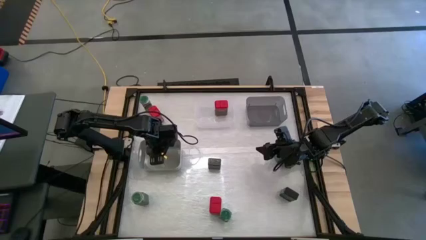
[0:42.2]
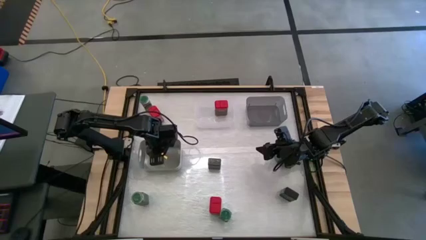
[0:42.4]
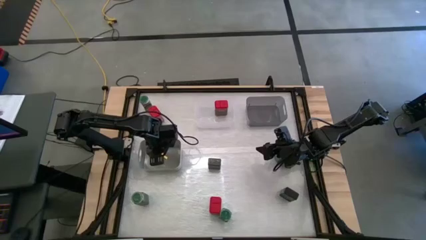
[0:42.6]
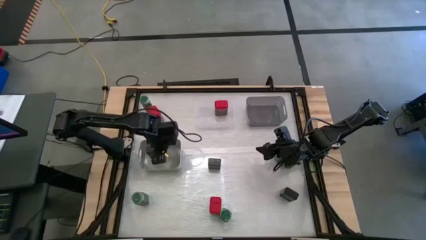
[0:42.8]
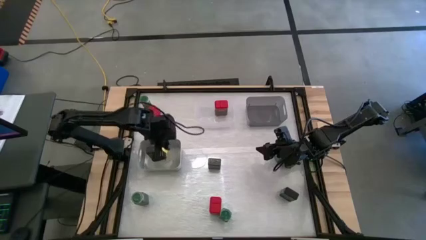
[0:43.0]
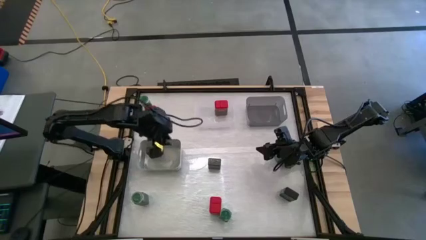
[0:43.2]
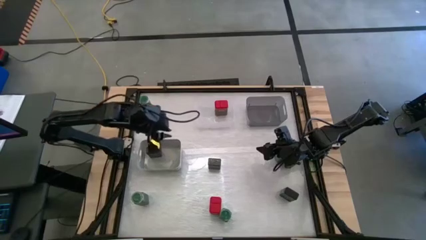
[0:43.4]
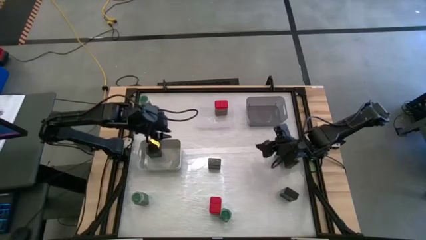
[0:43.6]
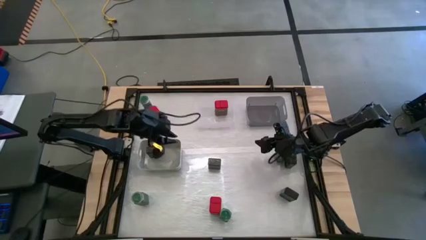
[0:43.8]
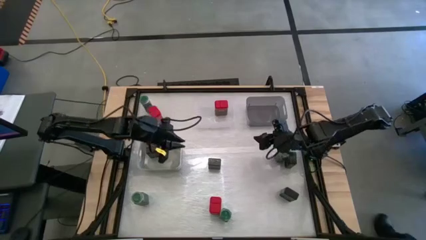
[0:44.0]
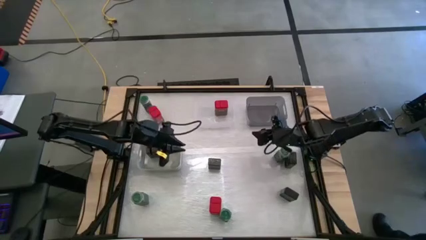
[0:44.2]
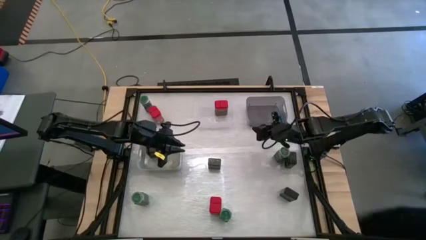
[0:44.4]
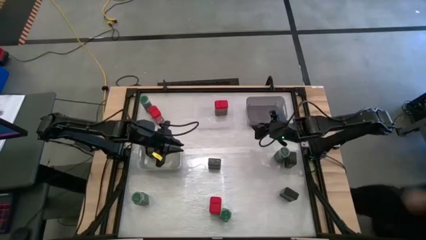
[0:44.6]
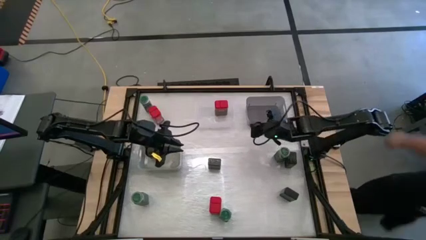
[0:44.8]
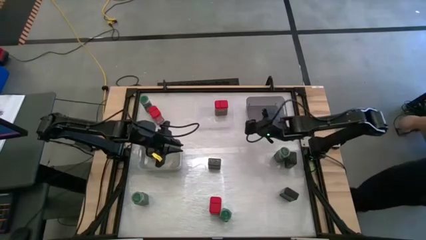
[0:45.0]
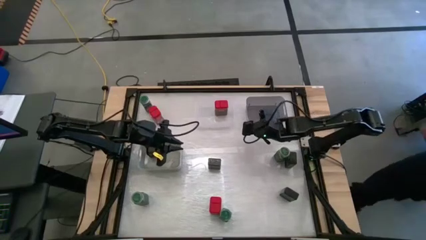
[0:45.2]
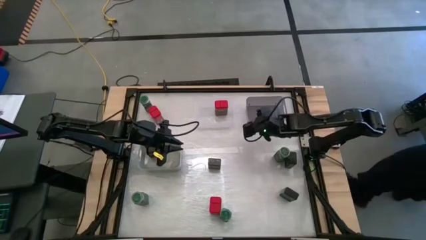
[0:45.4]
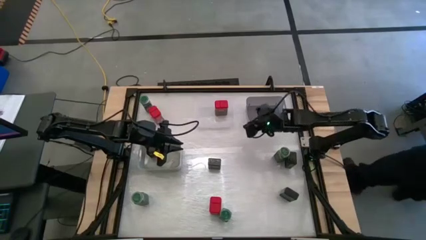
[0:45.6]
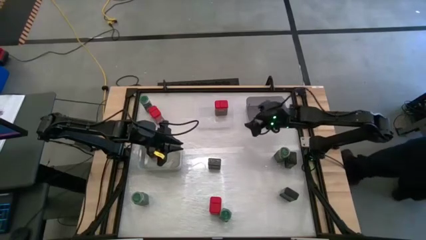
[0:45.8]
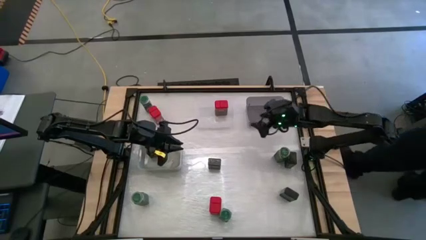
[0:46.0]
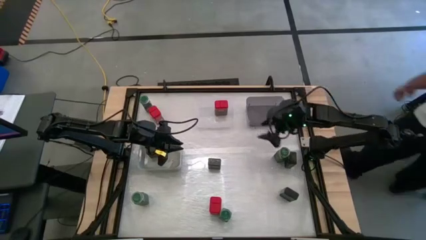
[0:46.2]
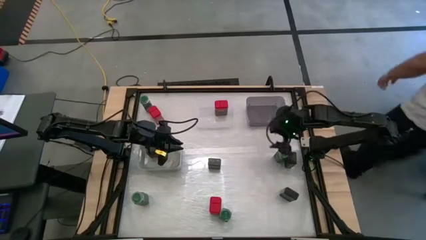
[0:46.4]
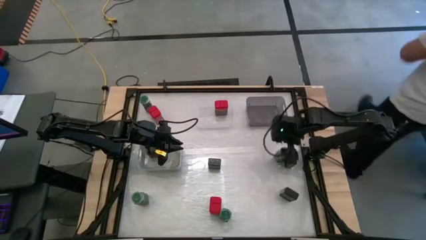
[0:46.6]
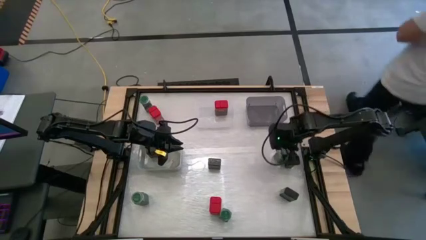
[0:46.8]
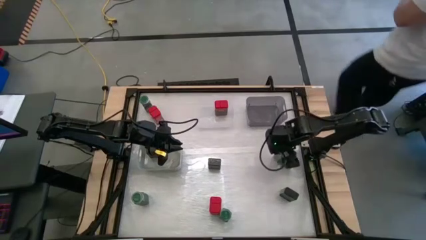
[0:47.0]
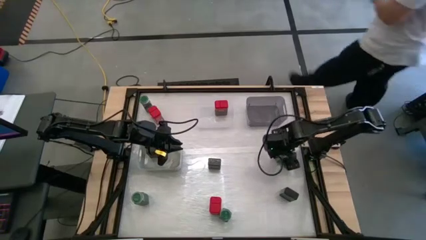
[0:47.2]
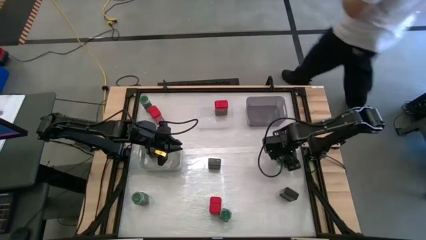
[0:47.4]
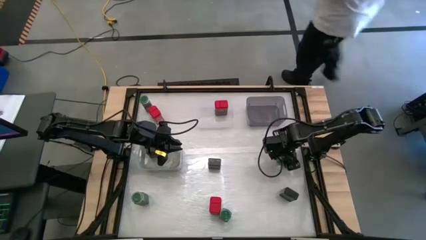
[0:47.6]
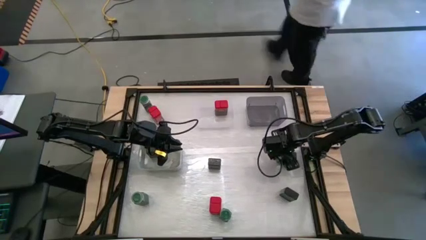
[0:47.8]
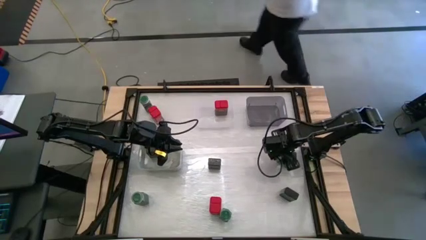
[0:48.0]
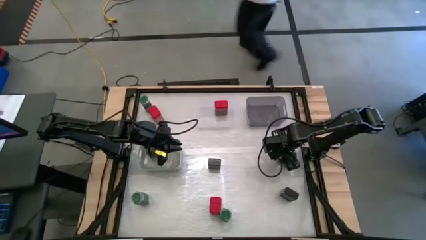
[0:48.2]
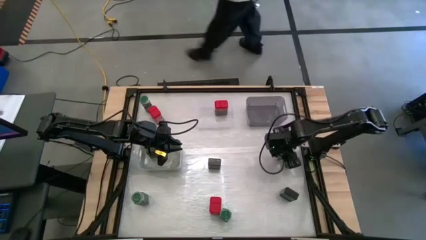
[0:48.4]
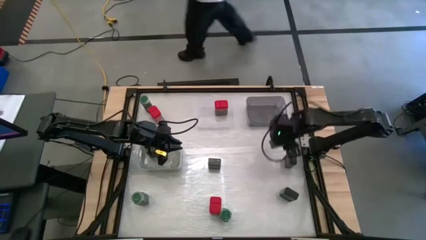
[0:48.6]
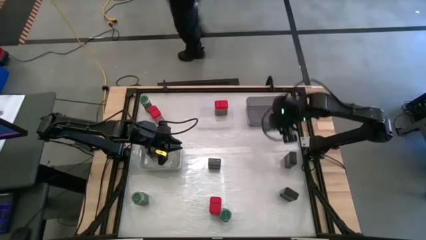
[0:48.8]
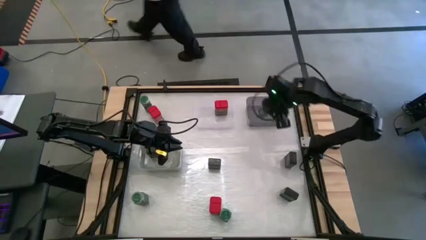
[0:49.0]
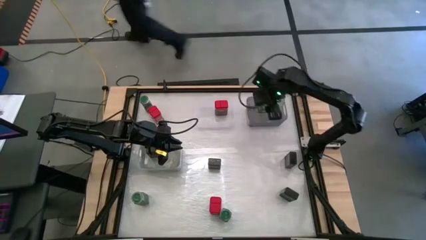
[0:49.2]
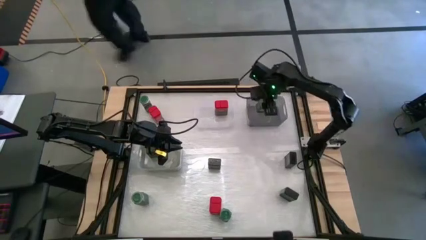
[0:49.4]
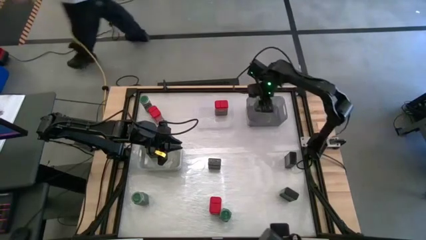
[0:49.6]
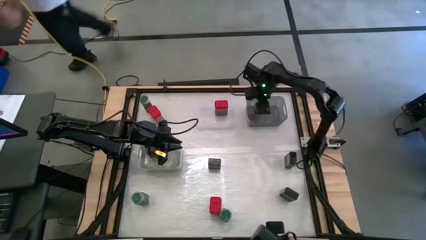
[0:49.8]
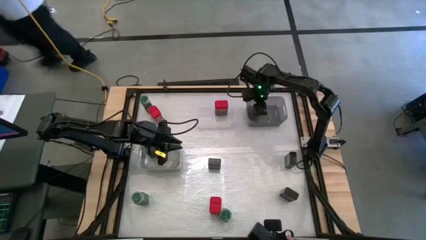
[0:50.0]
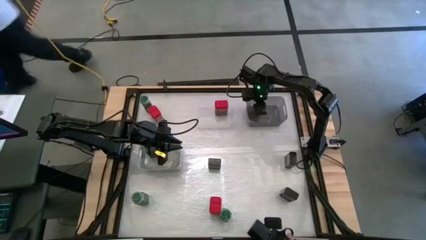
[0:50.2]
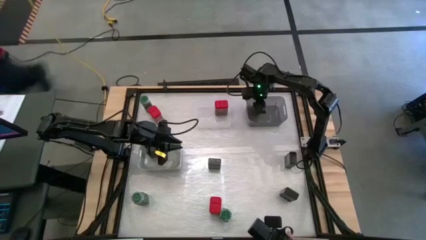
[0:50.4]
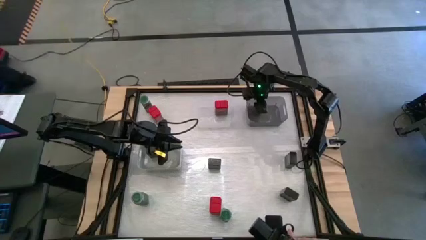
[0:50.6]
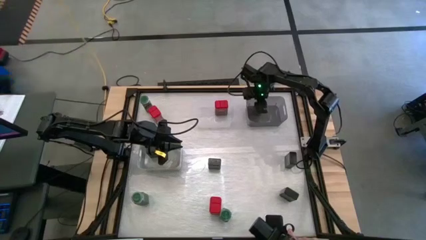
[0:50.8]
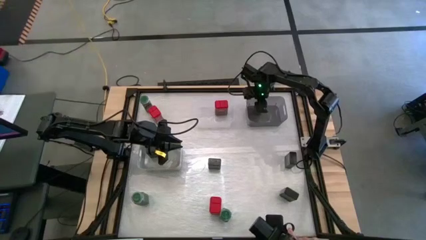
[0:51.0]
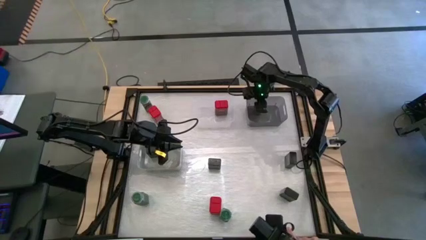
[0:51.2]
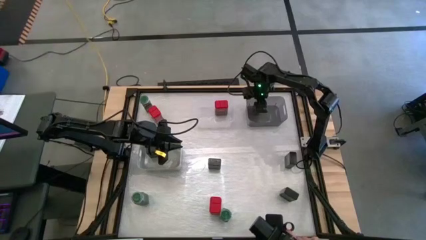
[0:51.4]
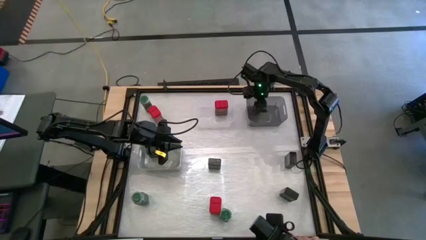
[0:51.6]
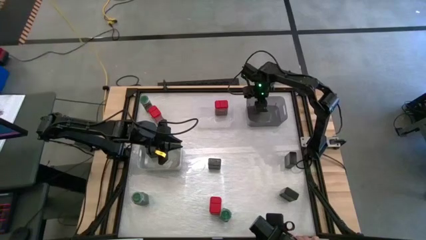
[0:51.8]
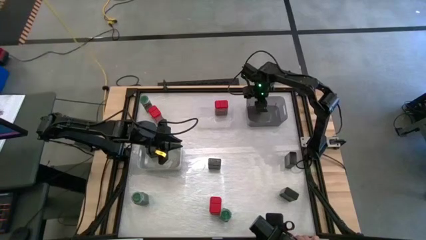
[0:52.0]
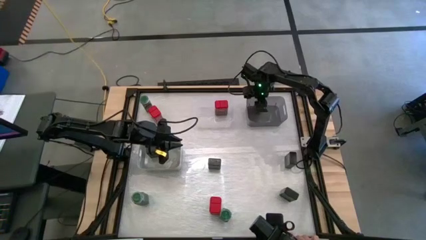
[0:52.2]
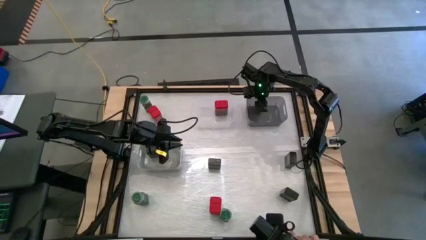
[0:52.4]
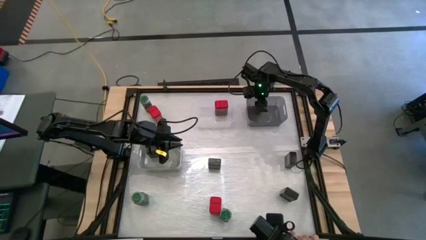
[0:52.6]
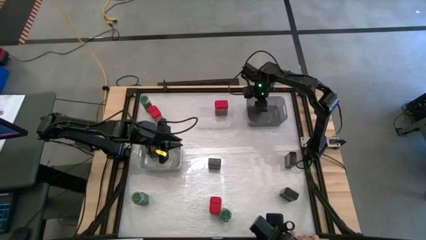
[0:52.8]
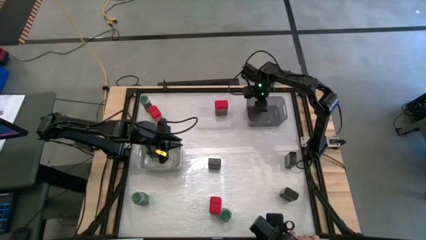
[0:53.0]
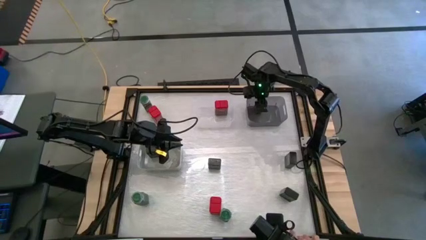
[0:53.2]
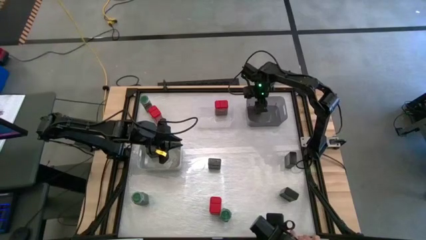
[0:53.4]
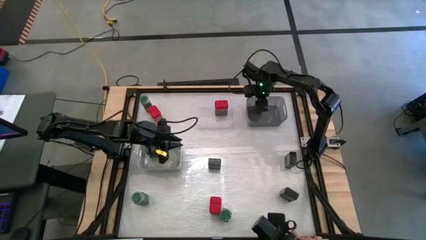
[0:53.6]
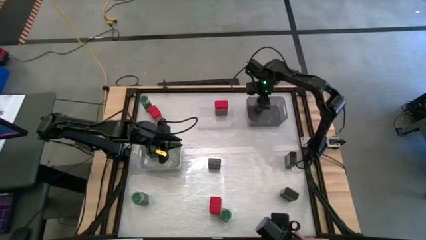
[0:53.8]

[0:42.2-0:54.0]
Task: Sort spices by type
Put the green seasoning bottle into the black bin

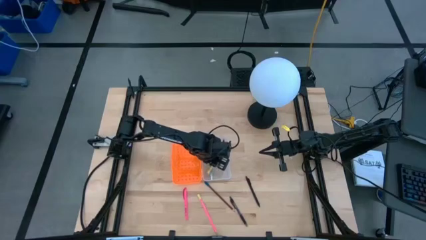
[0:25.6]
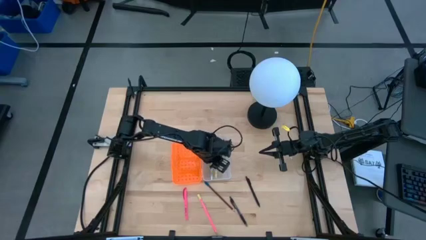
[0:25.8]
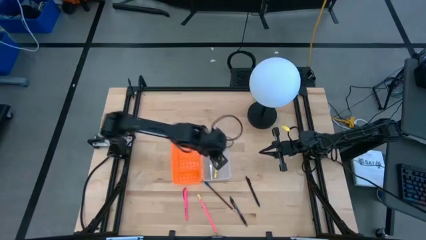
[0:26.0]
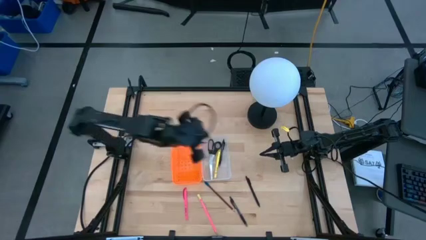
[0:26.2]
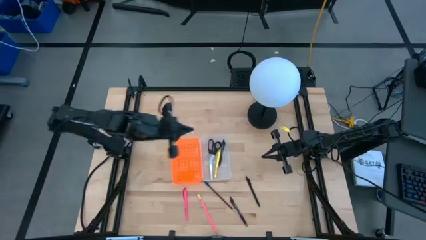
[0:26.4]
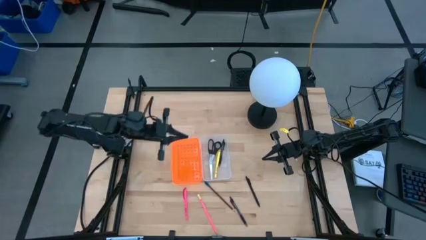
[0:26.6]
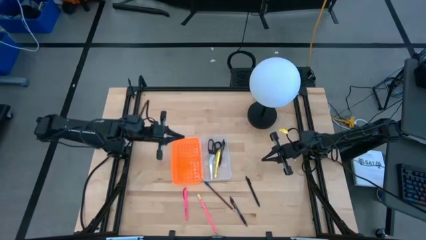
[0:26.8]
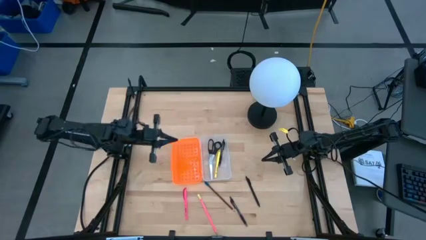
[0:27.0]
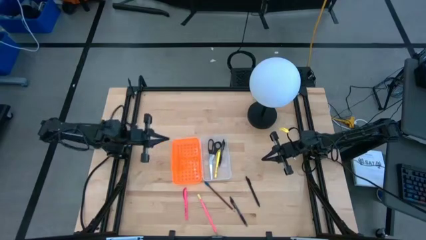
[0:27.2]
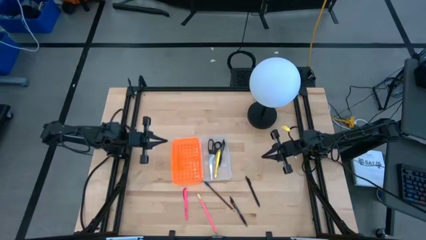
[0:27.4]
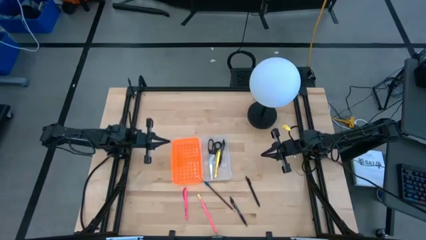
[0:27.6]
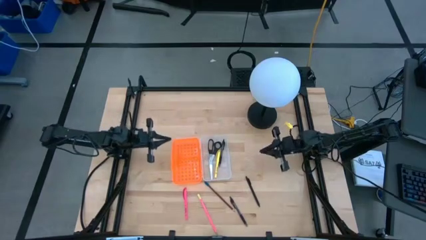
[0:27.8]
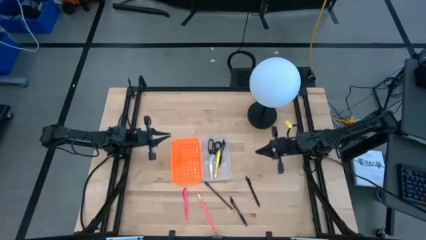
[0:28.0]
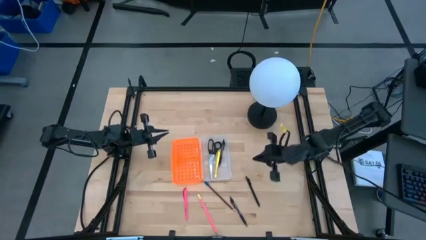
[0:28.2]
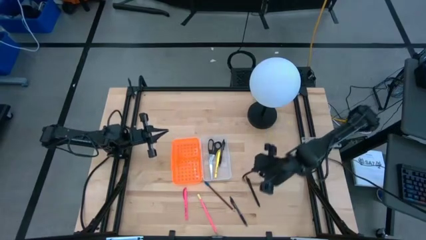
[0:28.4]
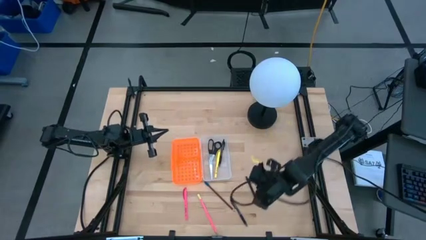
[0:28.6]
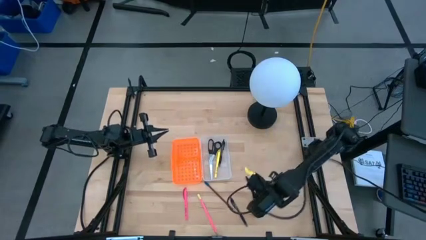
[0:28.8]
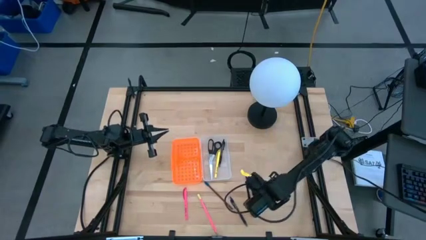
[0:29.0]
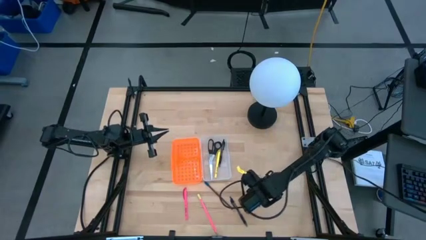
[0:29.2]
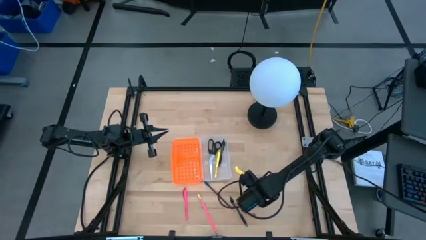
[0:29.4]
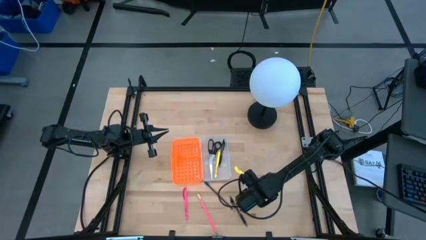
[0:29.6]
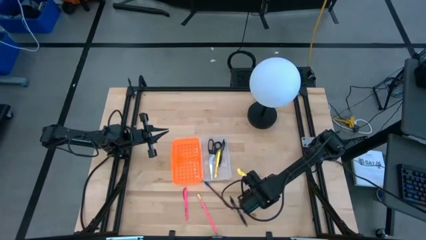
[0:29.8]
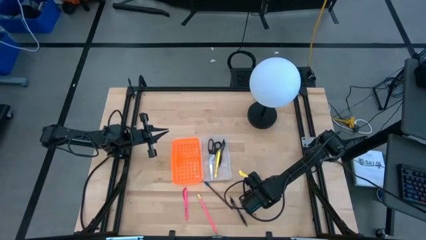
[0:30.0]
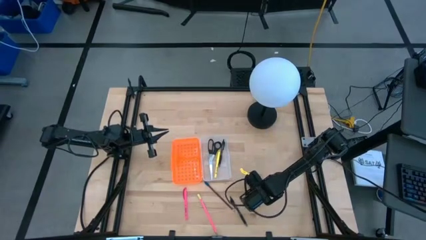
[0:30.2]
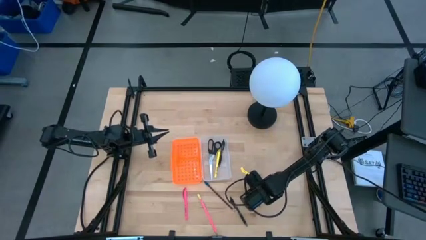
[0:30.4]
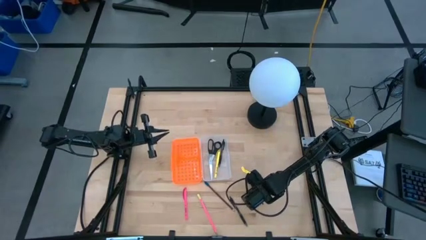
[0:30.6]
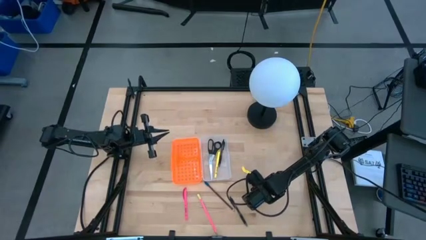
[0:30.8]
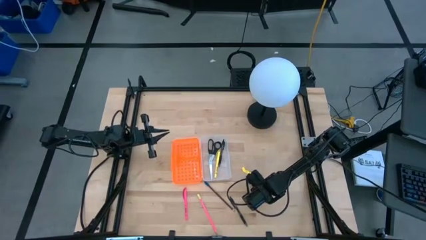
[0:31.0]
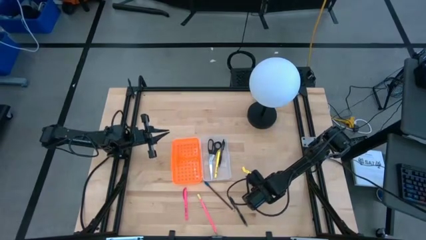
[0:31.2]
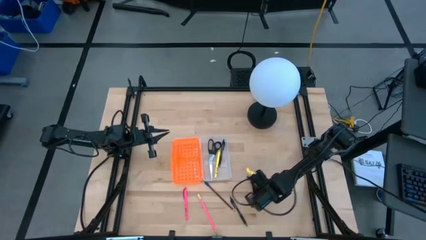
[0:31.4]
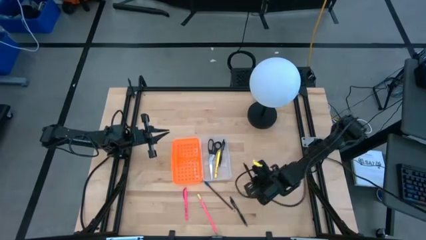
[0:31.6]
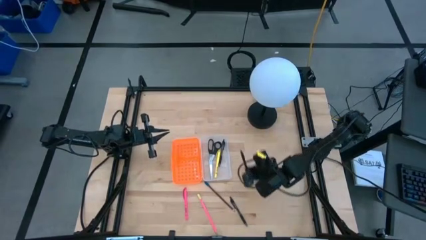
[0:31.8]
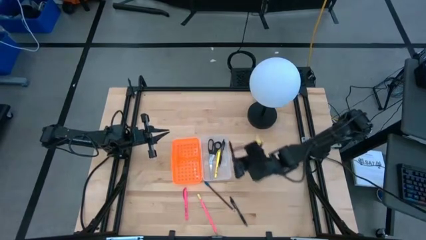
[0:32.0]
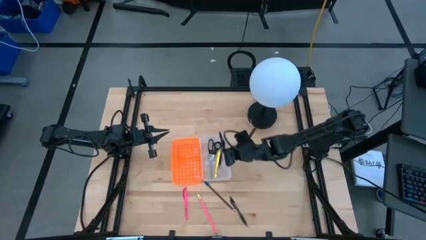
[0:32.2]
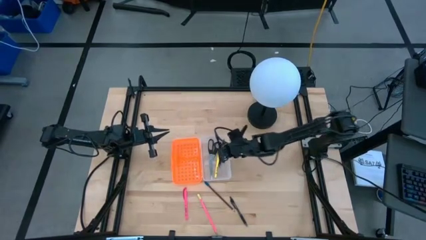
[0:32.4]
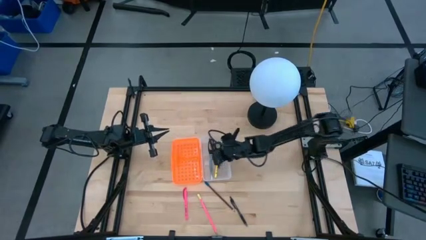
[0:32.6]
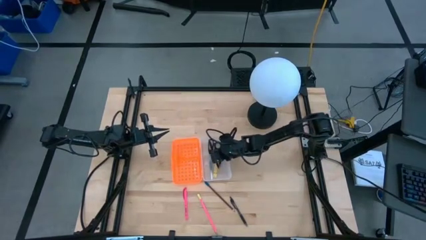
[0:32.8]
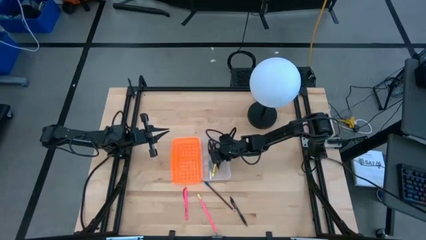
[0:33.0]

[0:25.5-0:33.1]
Task: Pick & place school supplies into a supply box
Put the top black pen into the supply box
